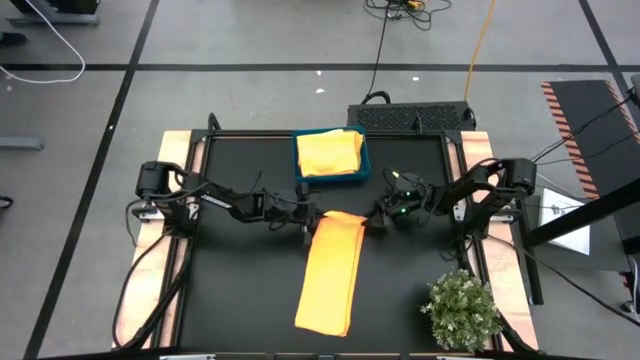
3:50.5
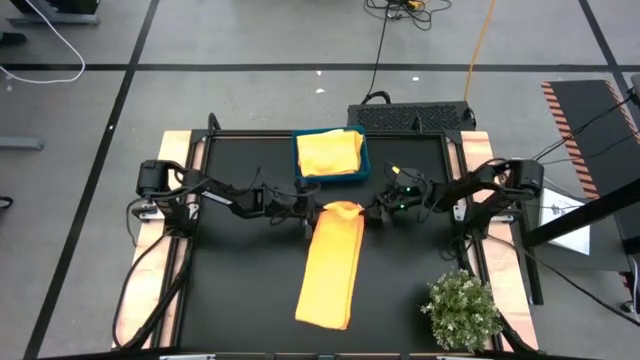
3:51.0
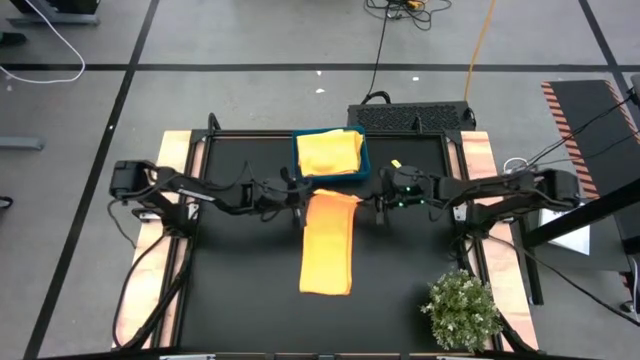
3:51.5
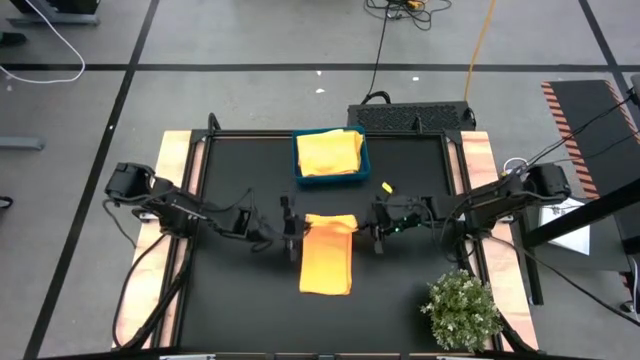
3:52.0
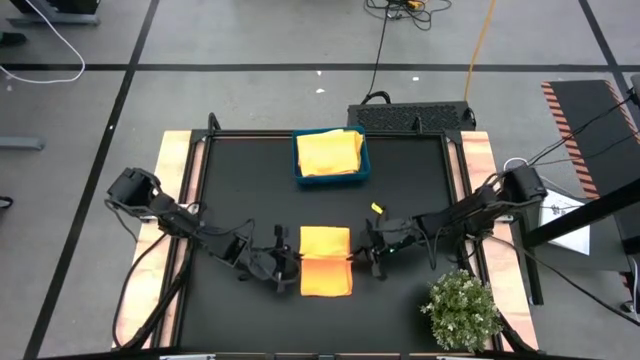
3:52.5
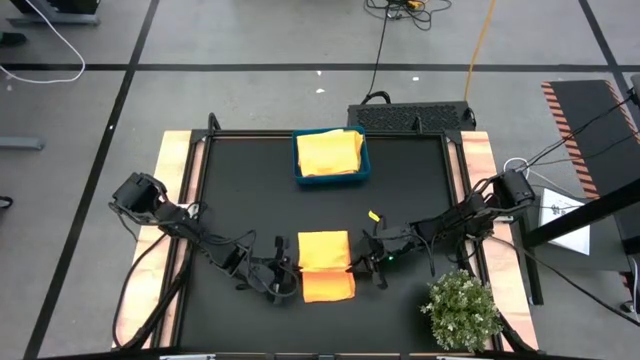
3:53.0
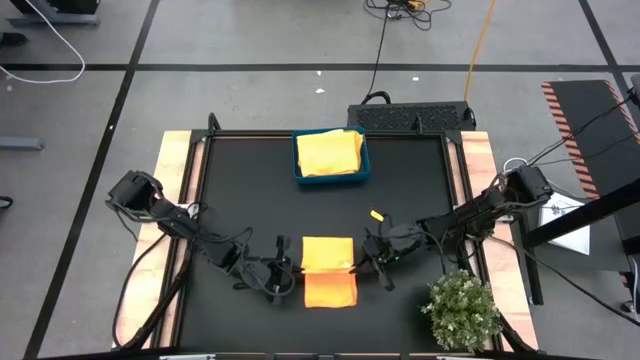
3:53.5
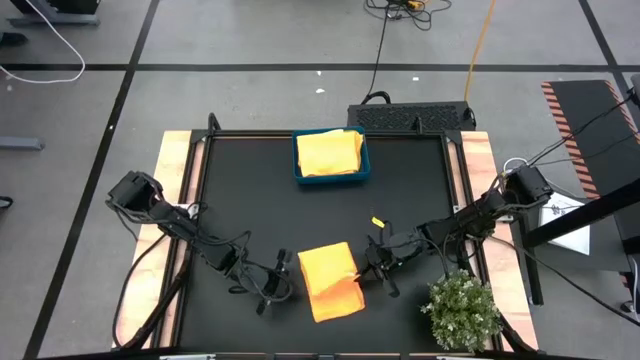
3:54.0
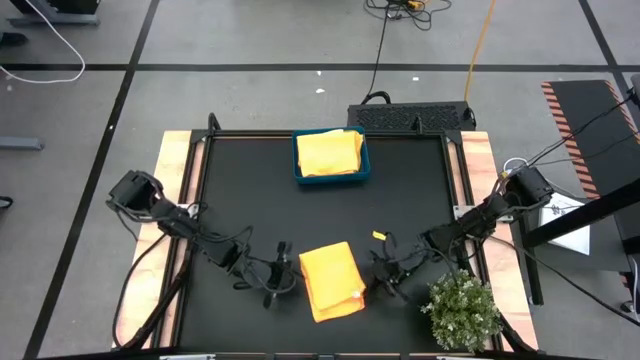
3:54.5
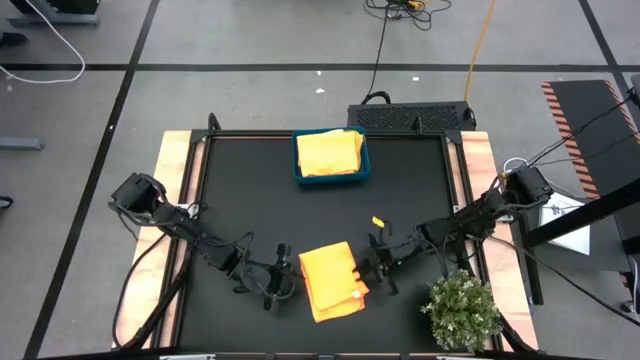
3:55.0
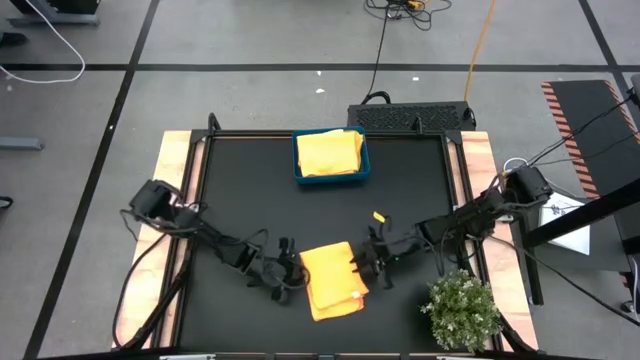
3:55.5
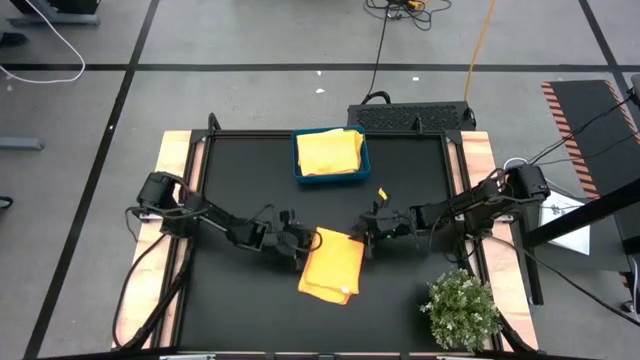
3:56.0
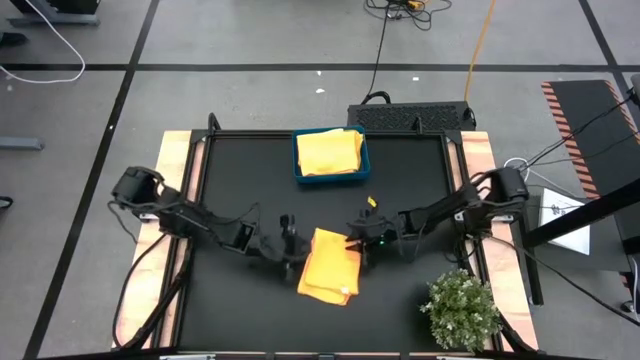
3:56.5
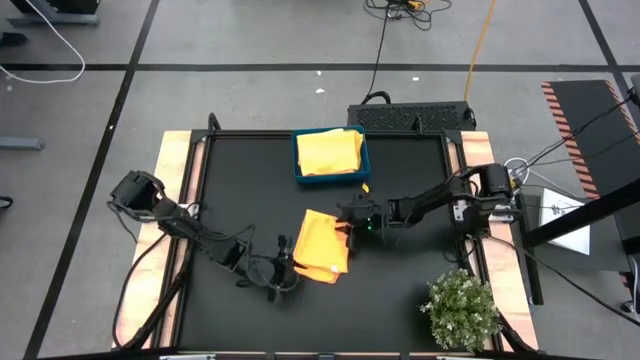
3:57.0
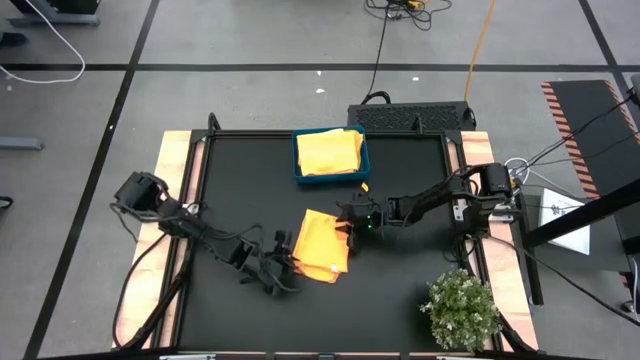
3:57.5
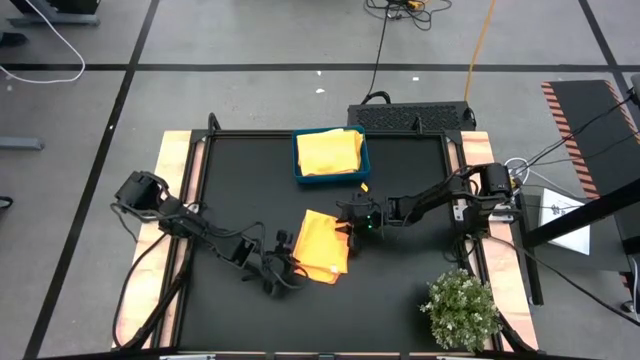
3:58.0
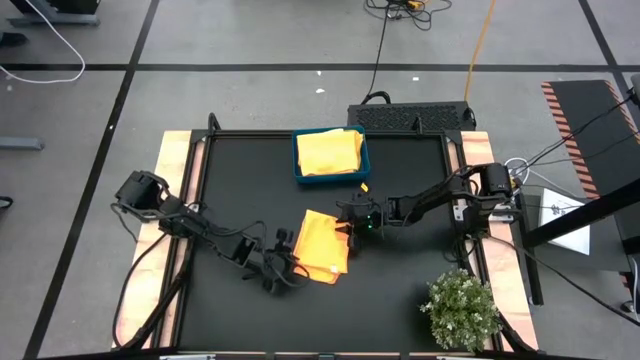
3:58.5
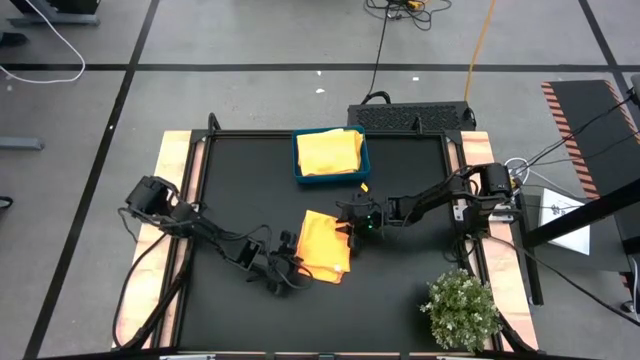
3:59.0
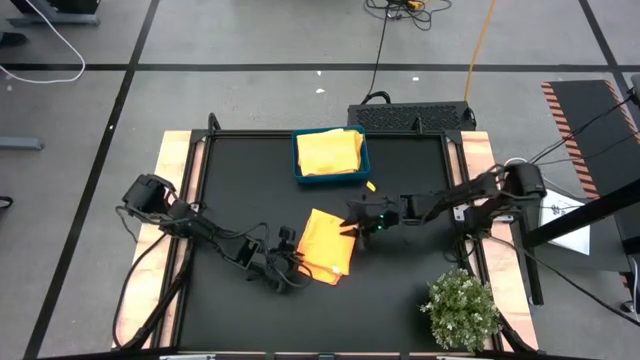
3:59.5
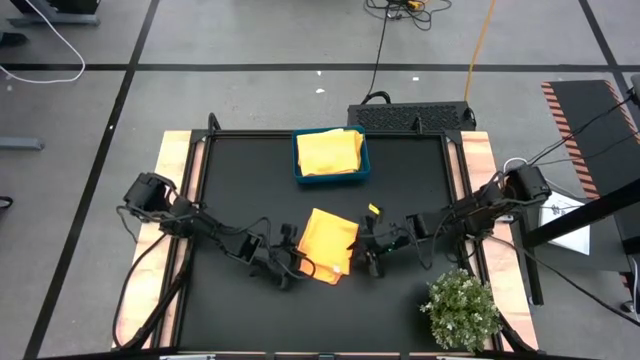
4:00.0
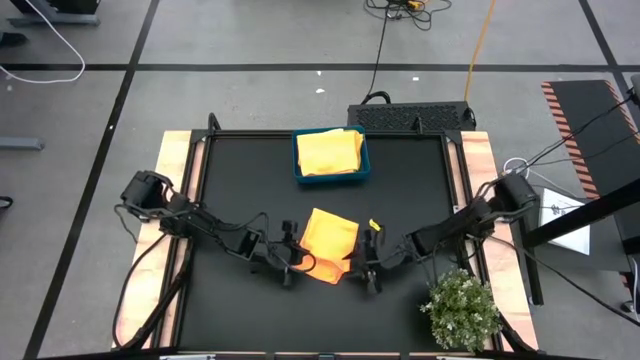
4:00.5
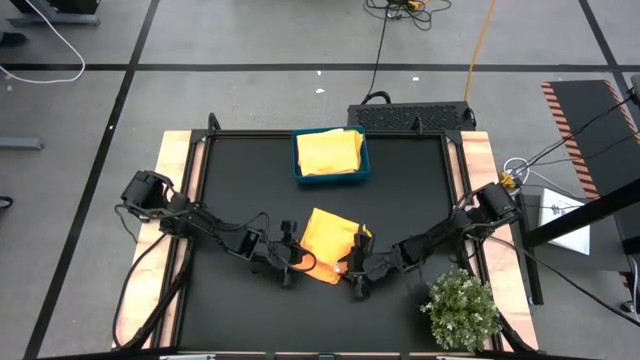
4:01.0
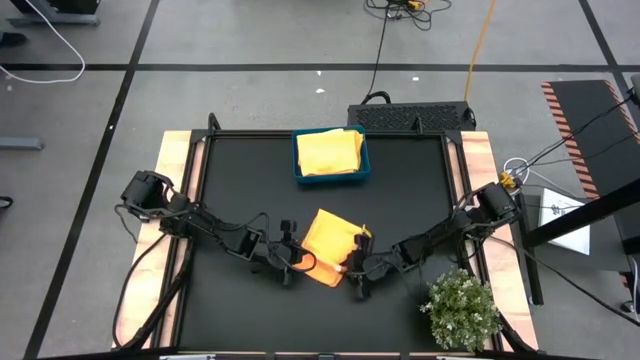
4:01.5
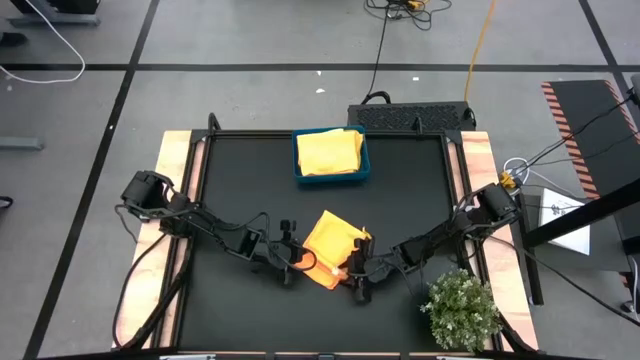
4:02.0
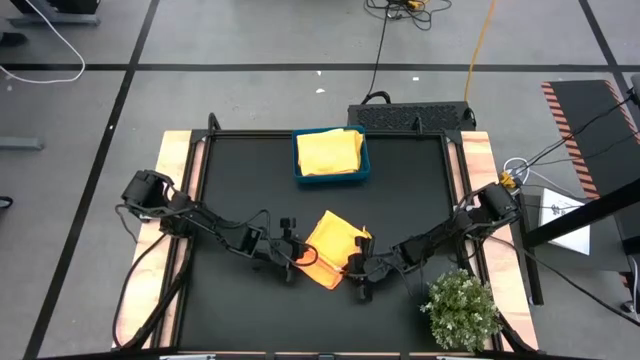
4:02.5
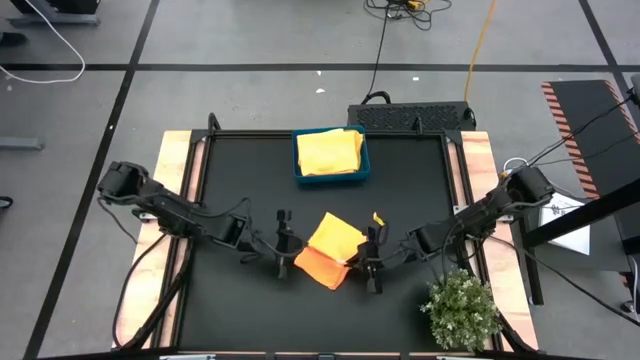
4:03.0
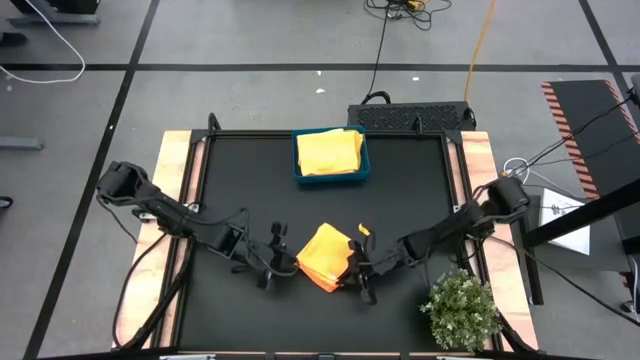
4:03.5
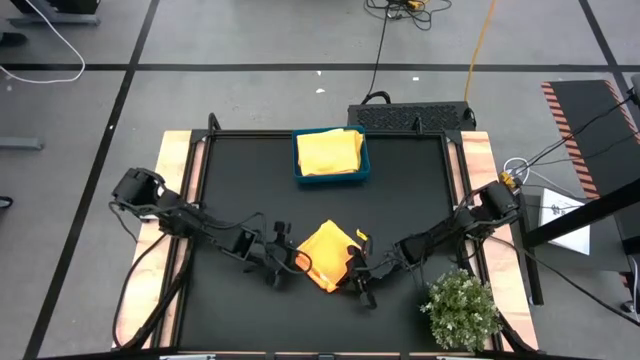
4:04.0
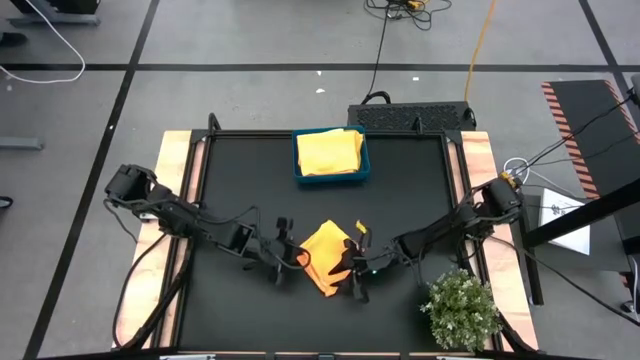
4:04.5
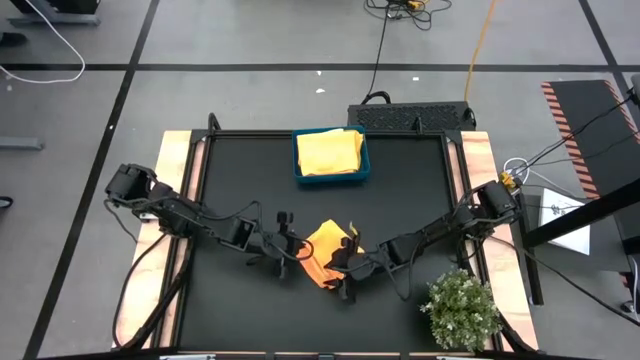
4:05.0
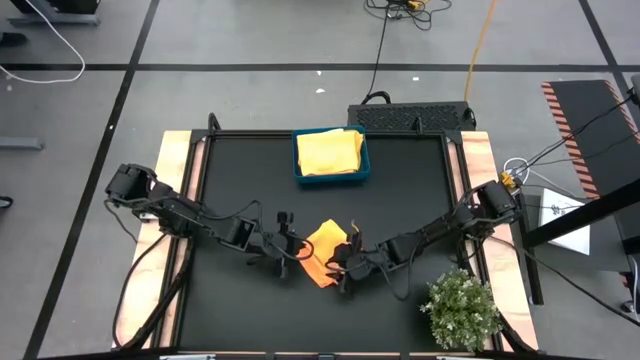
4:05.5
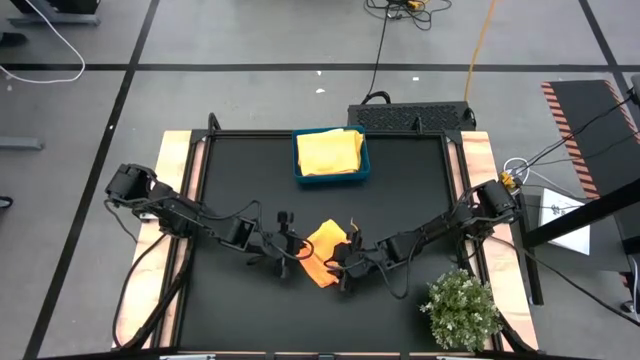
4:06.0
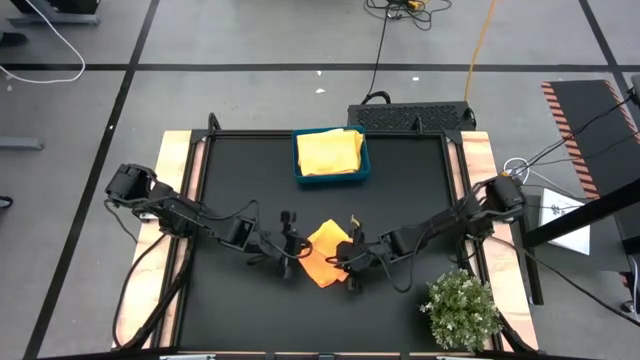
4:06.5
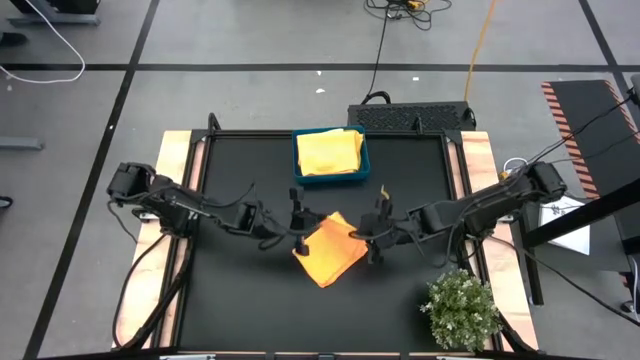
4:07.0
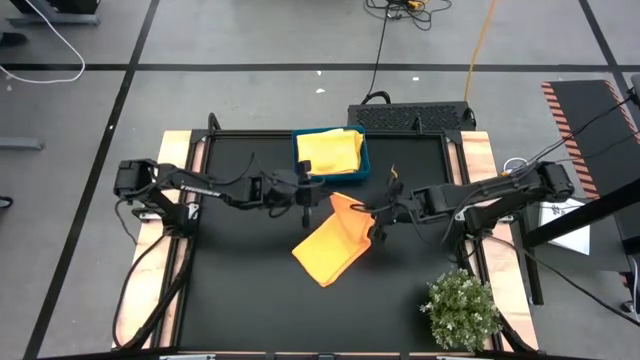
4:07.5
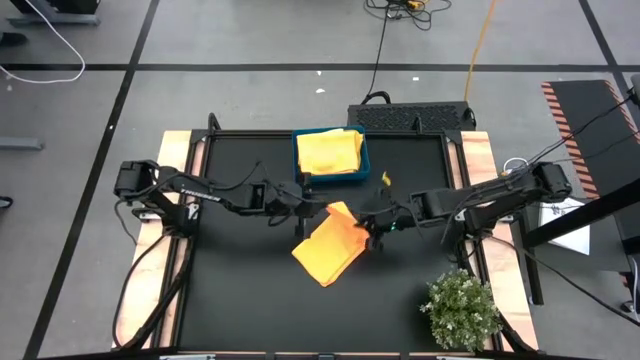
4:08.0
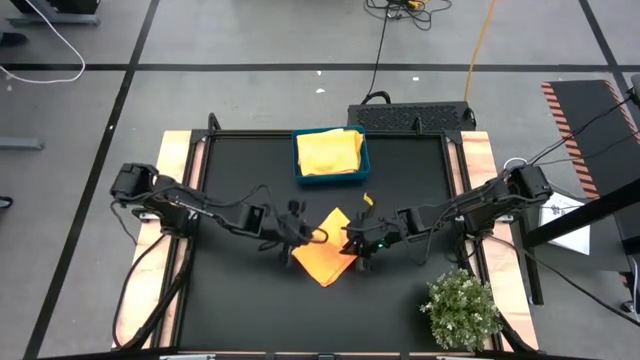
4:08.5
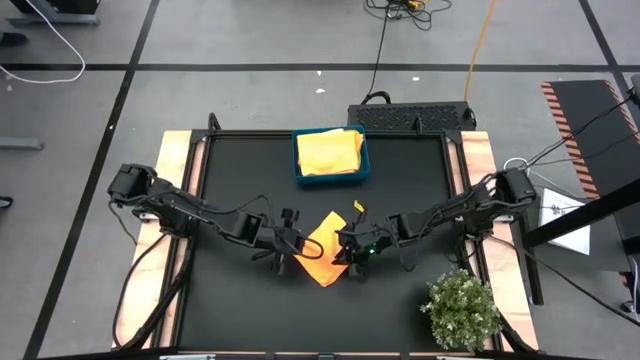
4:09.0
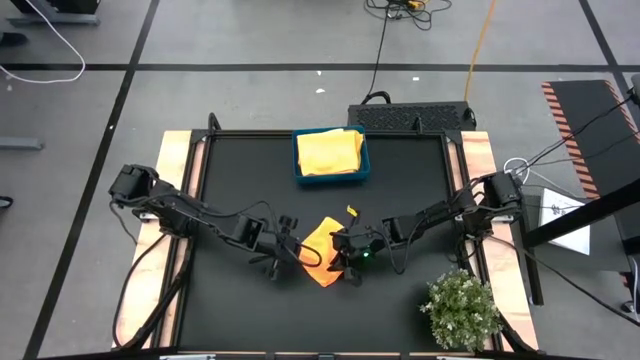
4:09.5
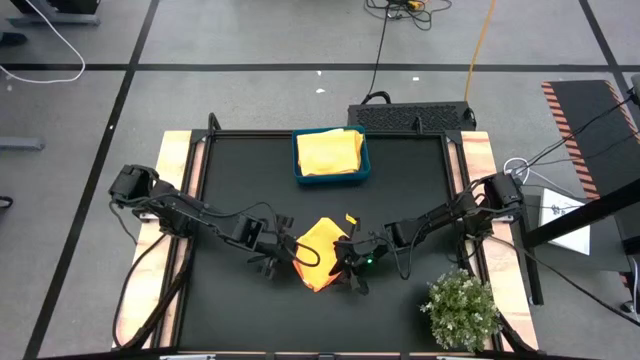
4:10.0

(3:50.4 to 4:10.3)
Task: Fold microfiber towels
Fold the folded orange microfiber towel

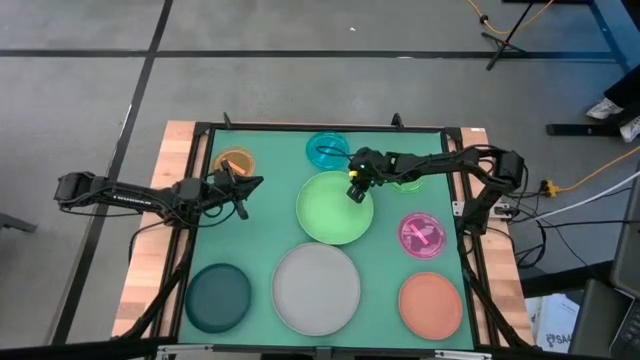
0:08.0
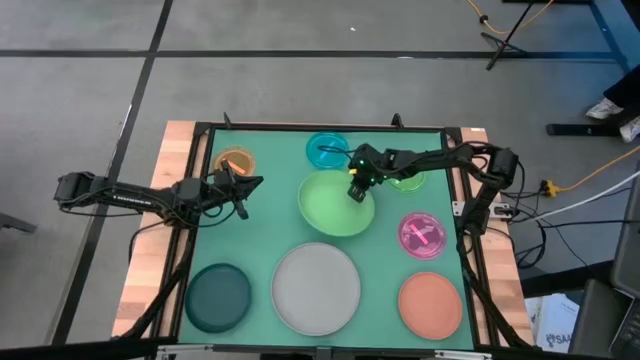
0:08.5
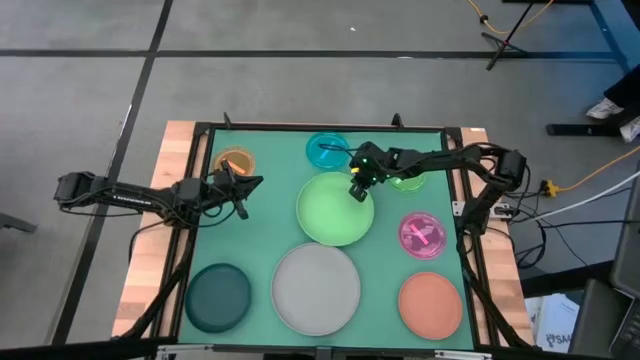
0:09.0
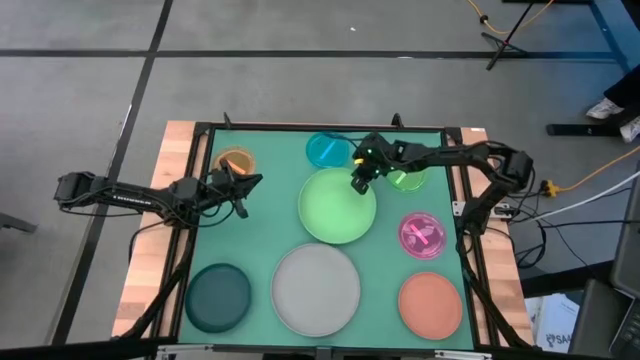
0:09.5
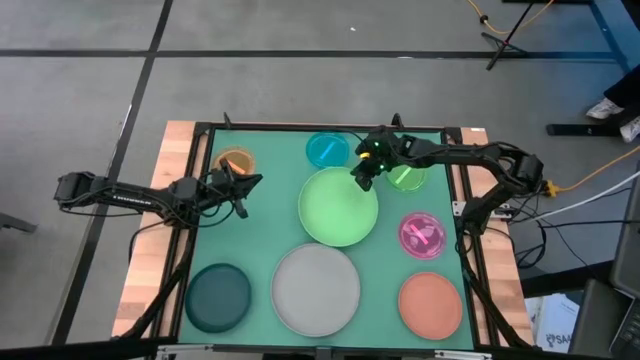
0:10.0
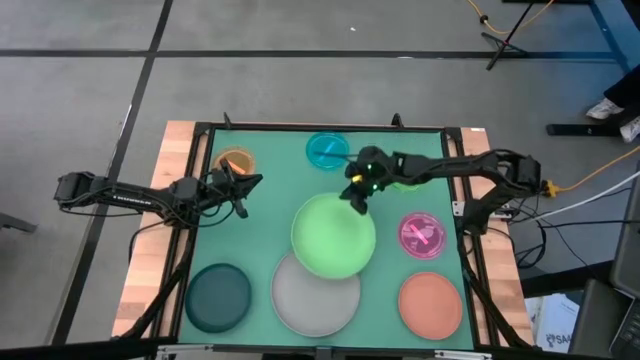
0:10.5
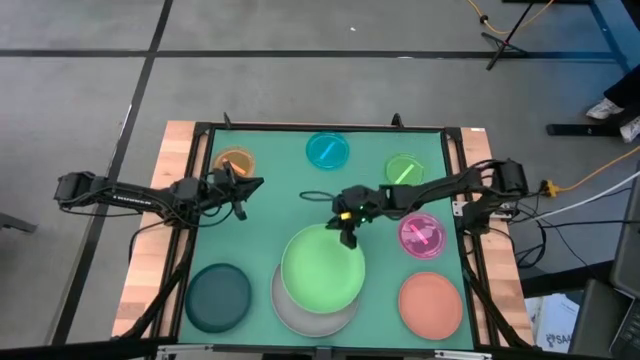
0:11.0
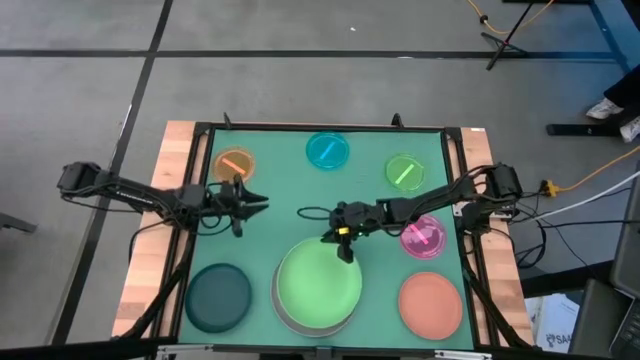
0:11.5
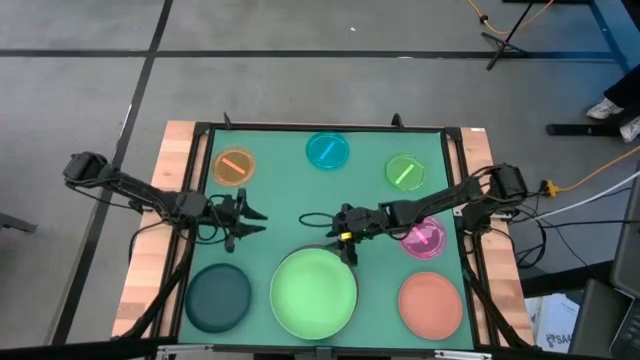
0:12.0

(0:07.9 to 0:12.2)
Task: Stack plastic plates
Stack the green plate on the gray plate
